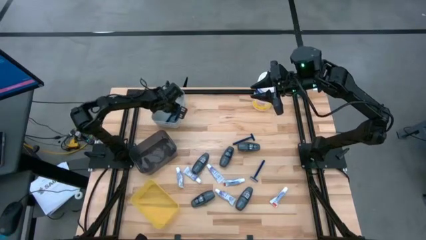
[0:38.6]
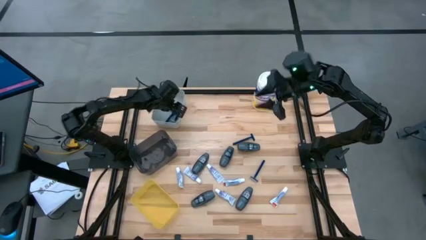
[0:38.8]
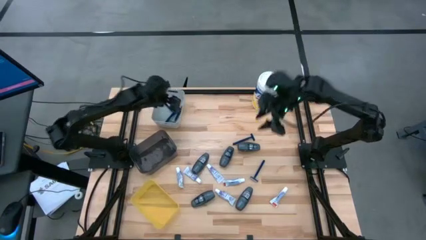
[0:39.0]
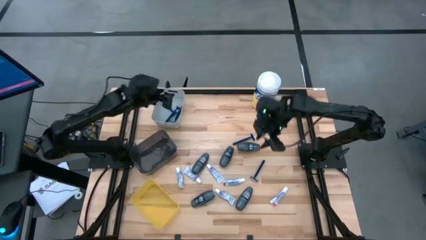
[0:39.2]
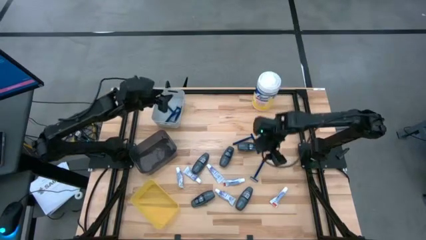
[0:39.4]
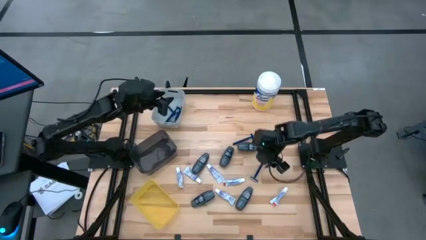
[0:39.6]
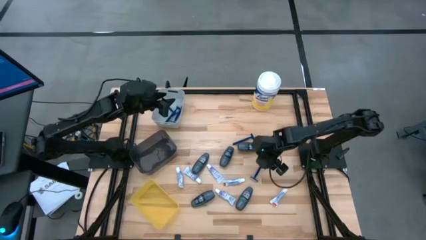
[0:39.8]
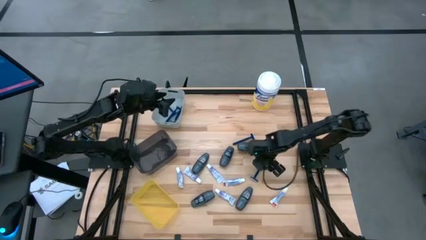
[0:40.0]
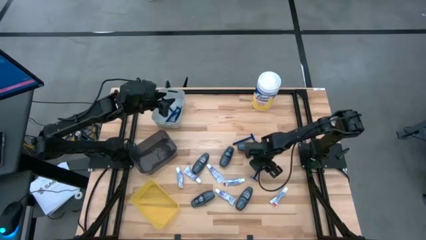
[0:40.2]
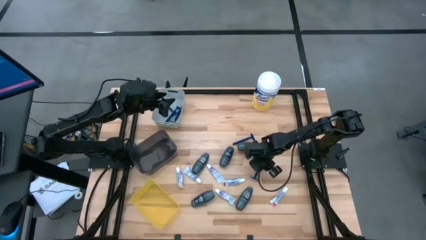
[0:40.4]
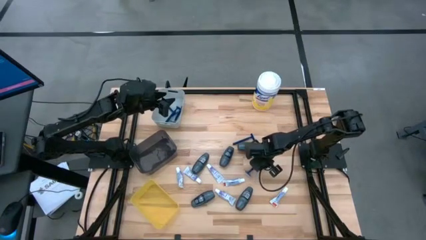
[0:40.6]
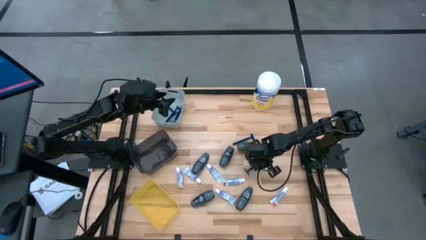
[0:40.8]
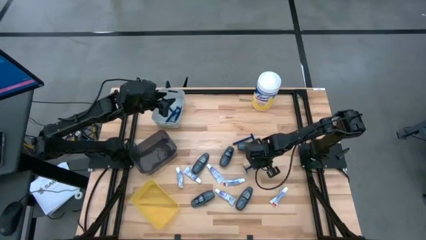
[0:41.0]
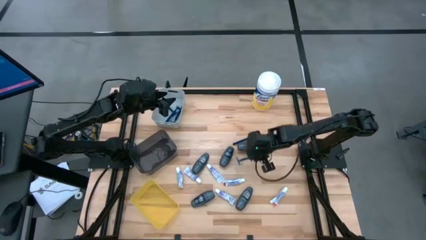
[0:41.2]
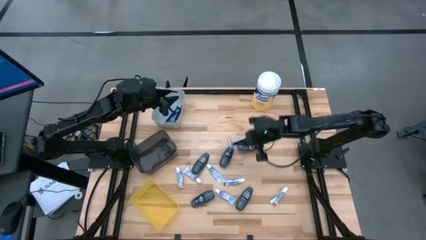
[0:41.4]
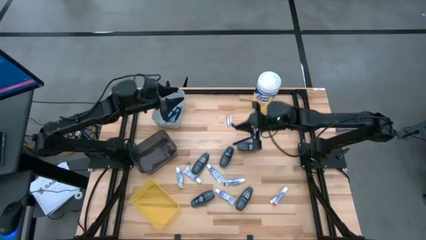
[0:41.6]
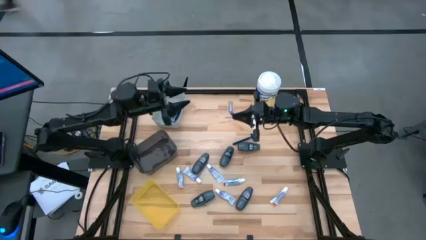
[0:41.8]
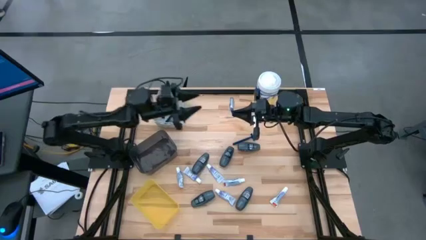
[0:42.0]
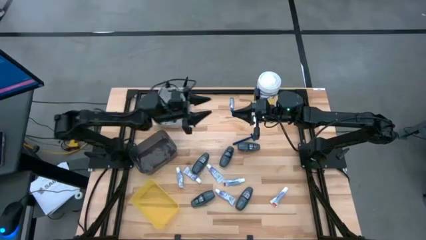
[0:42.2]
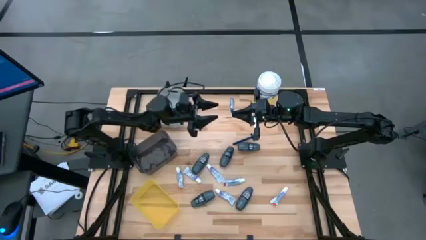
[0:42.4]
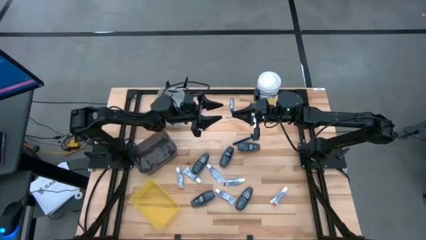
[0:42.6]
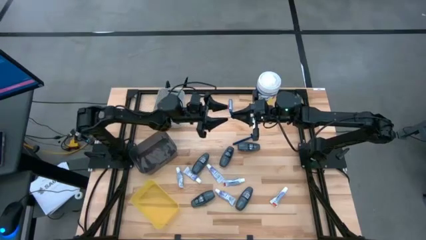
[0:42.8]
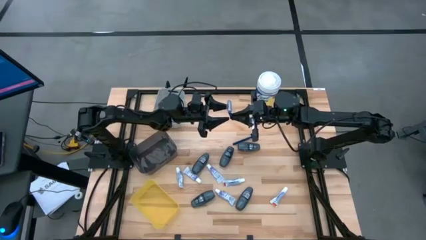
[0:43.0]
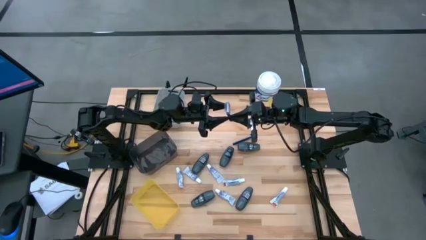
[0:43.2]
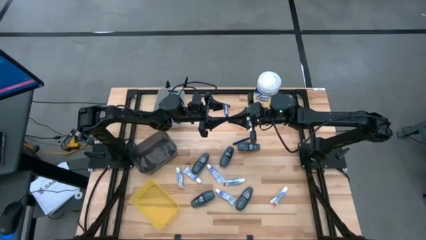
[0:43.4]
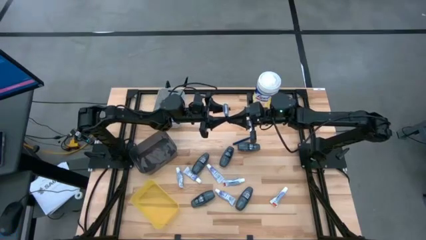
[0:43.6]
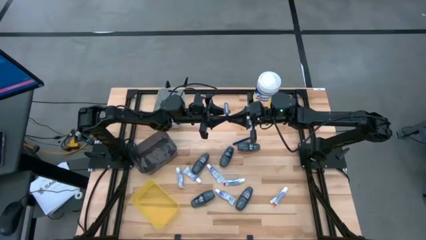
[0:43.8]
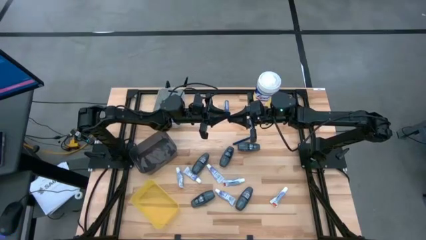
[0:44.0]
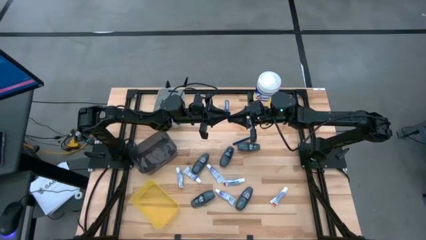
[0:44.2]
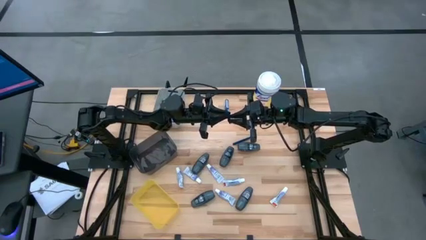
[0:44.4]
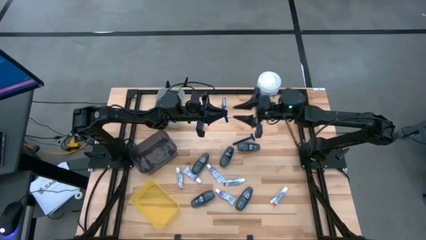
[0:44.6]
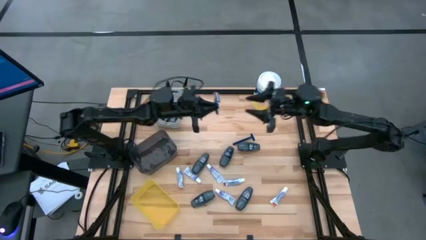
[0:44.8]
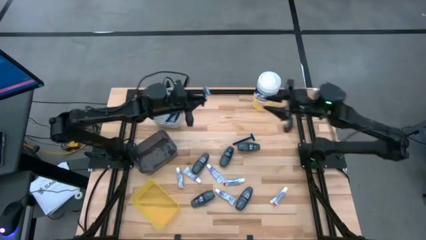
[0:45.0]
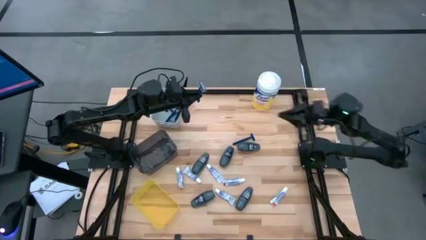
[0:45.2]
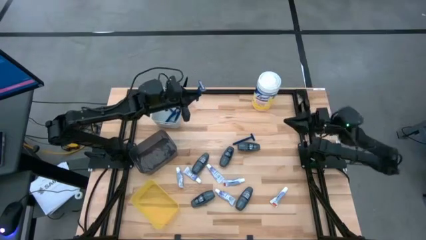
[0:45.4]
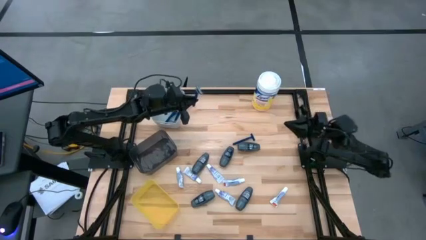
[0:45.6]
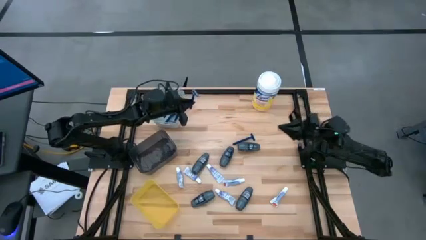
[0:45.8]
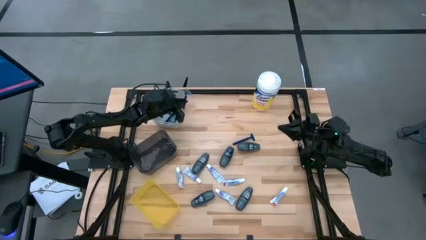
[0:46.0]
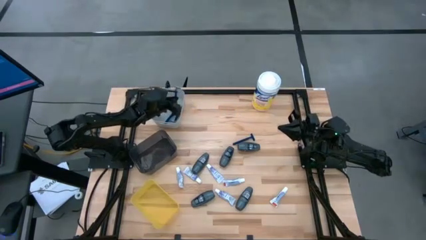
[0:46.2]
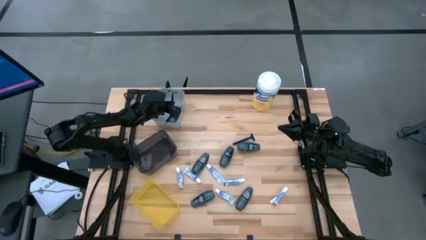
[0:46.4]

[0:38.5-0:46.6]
Task: Pick & Place Travel size toiletries
Put the razor into the gray bin

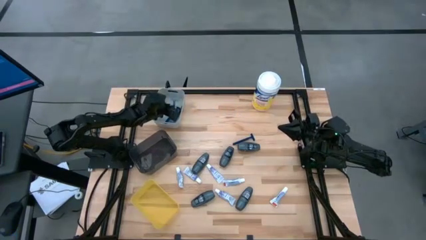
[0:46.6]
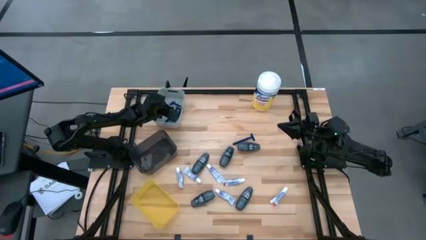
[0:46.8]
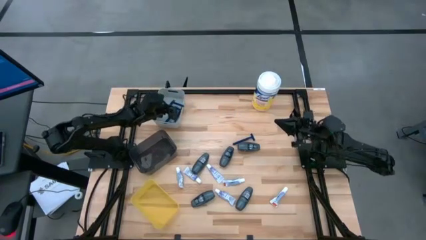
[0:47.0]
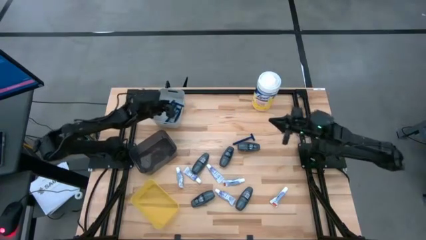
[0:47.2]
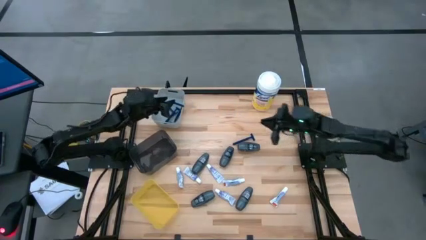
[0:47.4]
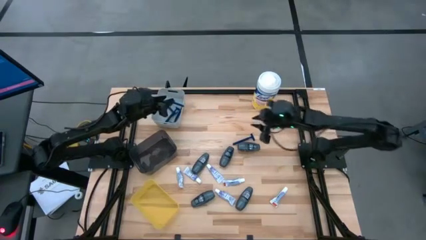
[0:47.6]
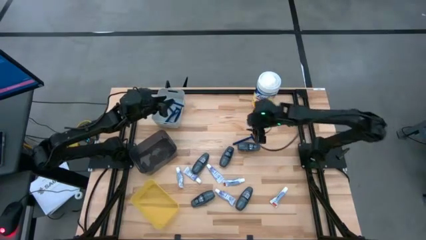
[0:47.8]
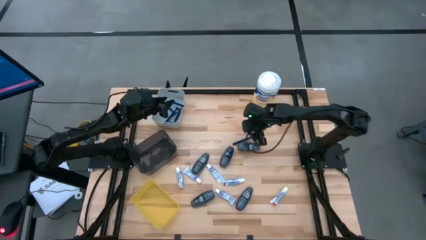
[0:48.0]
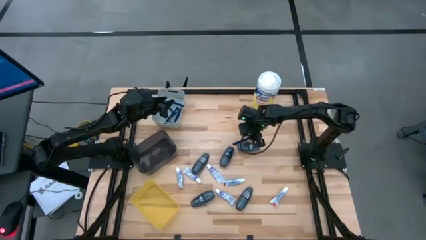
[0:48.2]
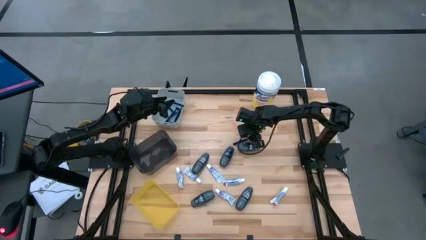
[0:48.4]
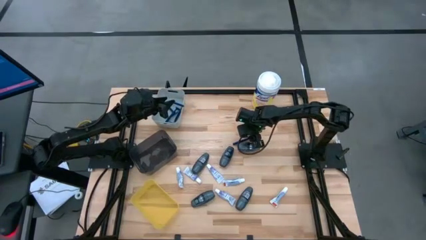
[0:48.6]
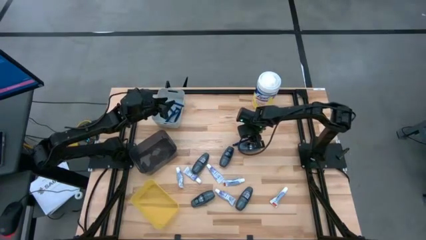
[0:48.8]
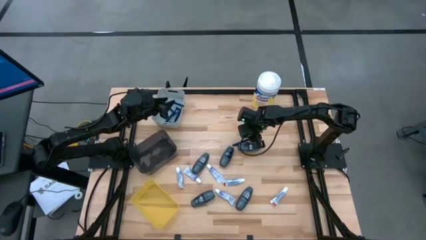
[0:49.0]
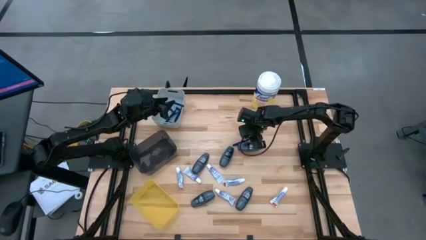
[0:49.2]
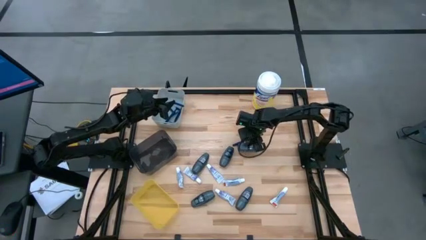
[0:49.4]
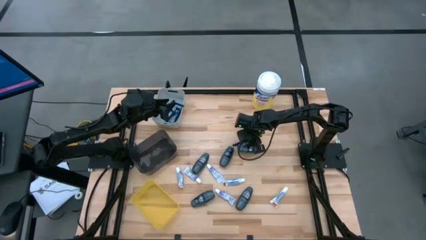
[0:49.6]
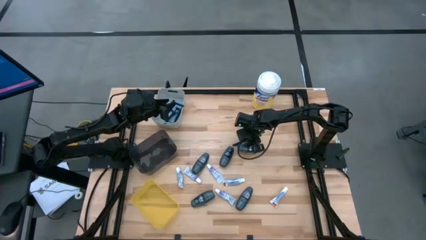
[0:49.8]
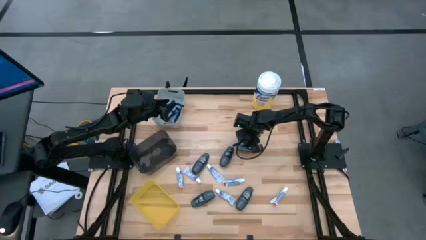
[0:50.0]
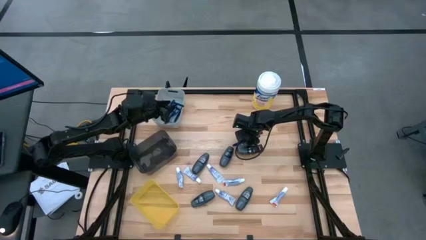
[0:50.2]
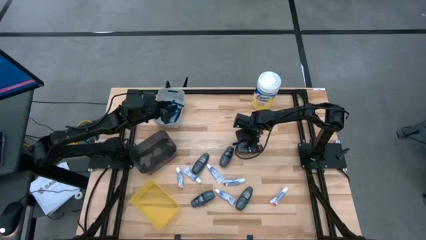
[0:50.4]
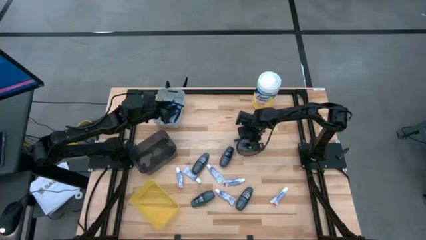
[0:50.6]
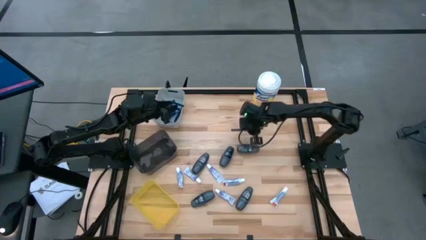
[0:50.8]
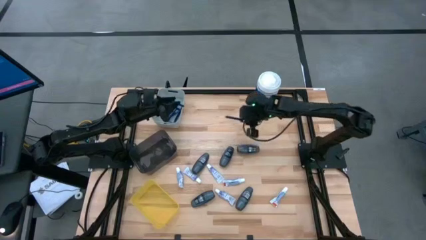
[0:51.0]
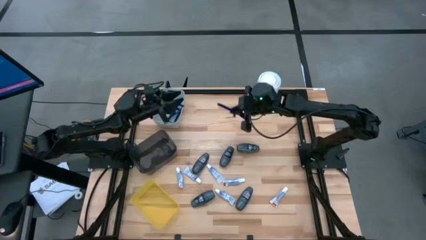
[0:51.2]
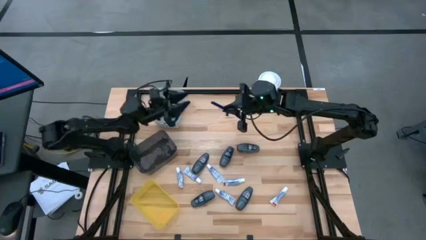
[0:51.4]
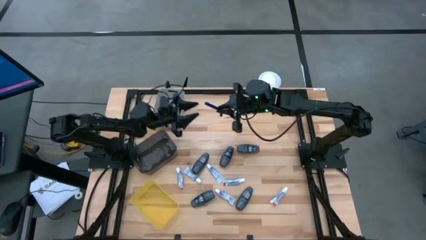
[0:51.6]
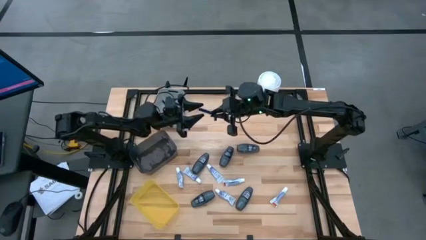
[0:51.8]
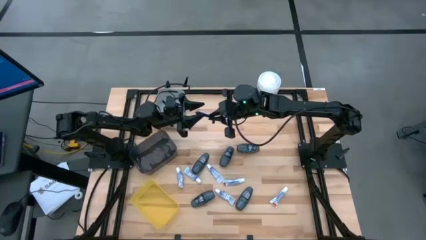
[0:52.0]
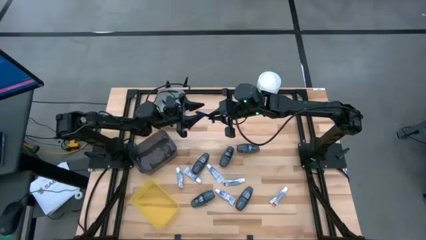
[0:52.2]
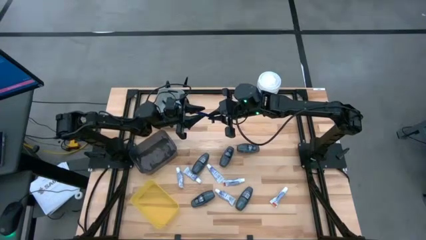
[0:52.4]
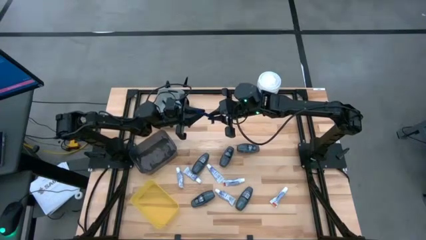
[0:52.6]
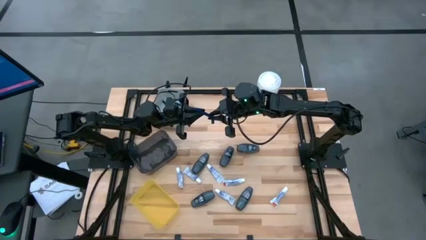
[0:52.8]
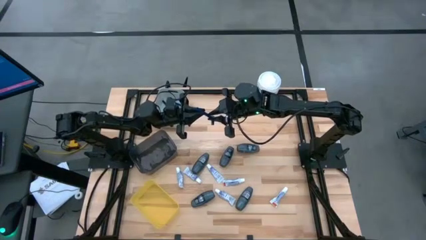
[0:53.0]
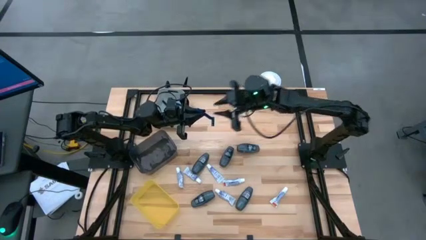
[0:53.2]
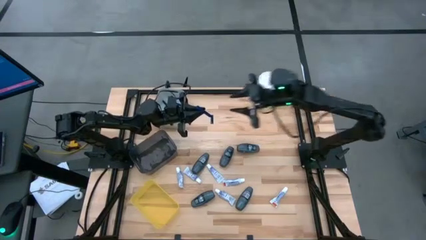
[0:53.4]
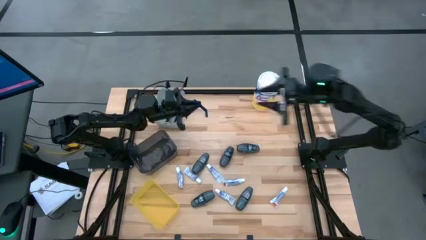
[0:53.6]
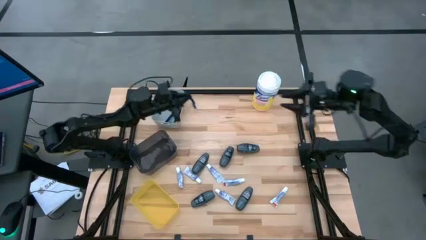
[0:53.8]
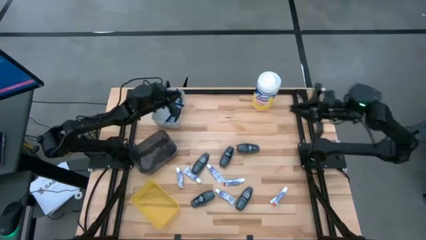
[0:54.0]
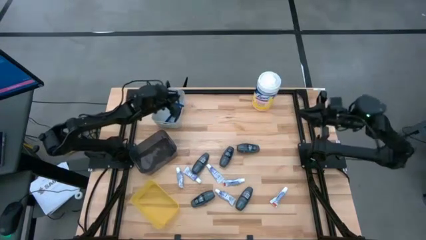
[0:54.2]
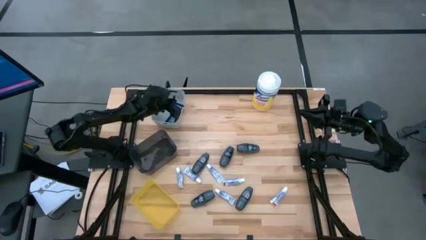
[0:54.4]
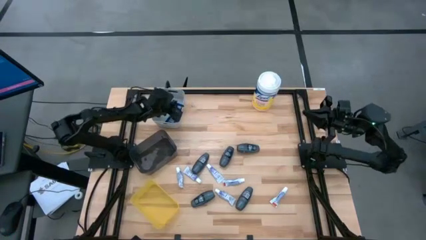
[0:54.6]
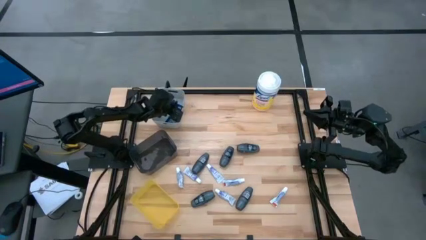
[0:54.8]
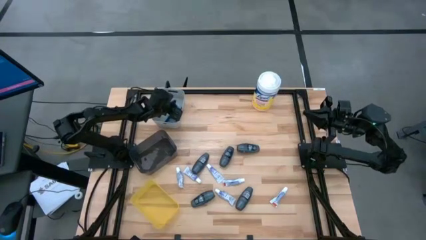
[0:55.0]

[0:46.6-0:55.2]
Put the razor into the gray bin
